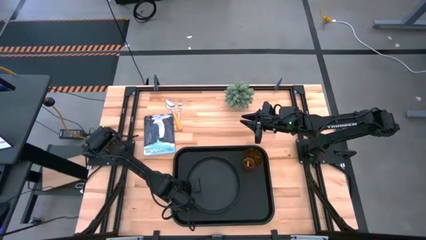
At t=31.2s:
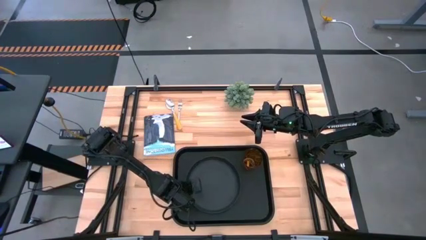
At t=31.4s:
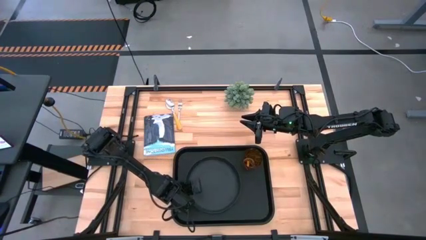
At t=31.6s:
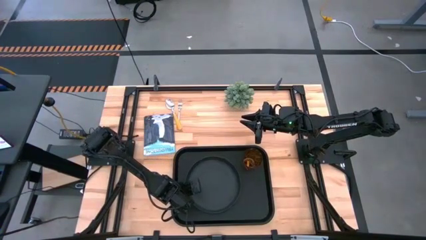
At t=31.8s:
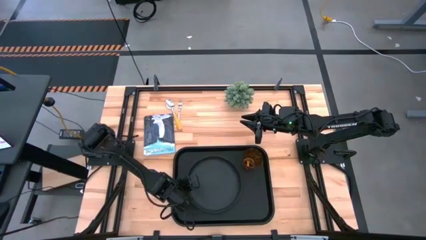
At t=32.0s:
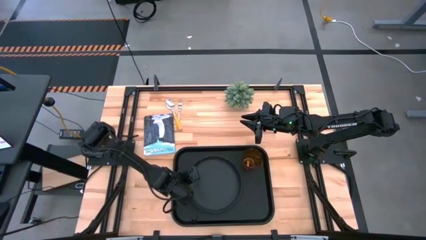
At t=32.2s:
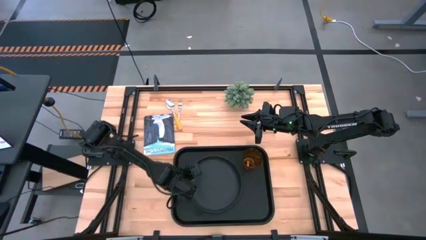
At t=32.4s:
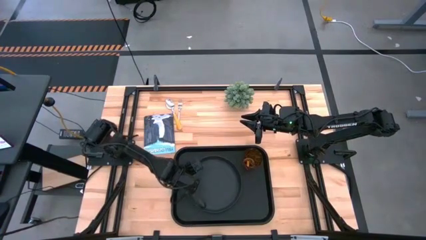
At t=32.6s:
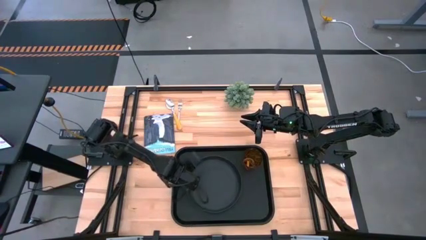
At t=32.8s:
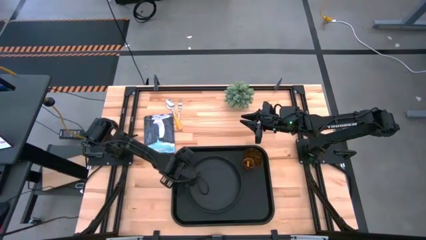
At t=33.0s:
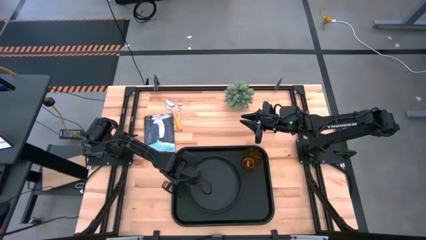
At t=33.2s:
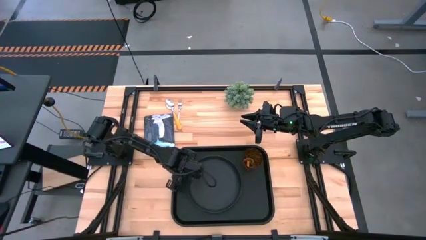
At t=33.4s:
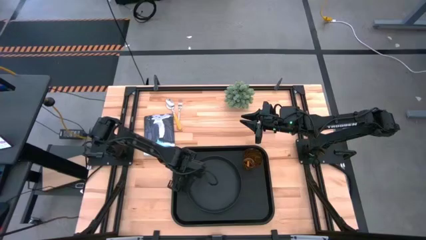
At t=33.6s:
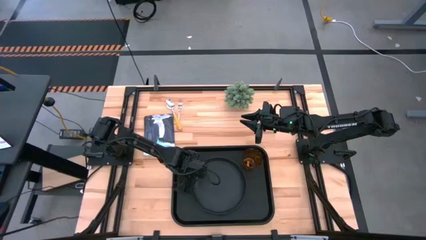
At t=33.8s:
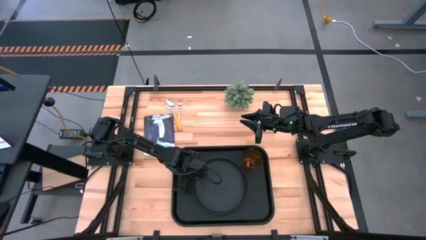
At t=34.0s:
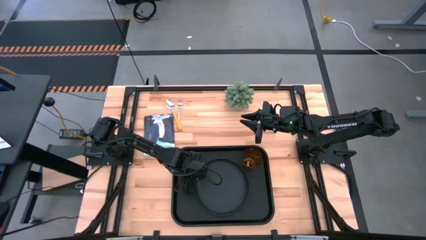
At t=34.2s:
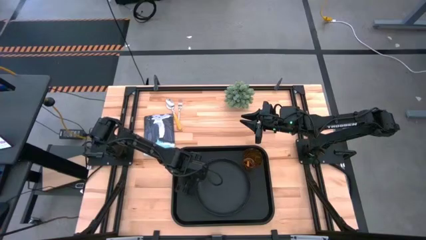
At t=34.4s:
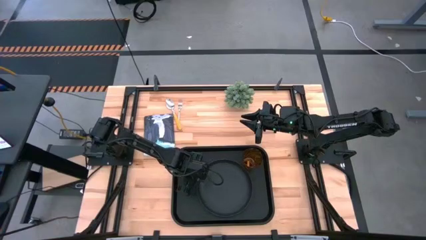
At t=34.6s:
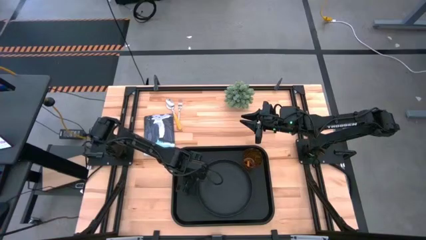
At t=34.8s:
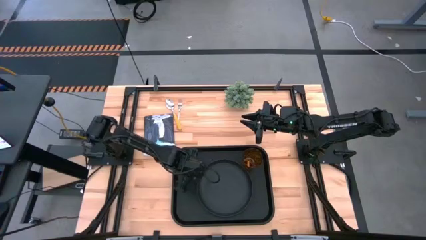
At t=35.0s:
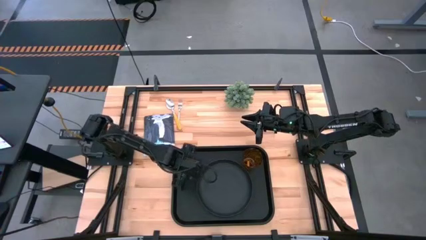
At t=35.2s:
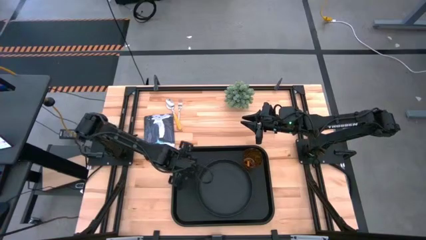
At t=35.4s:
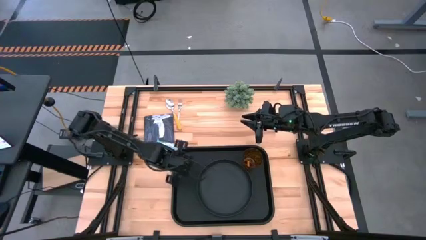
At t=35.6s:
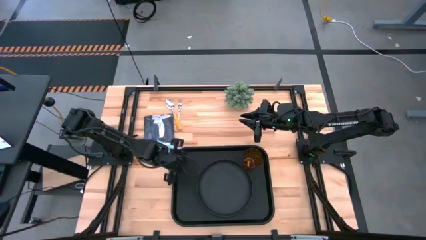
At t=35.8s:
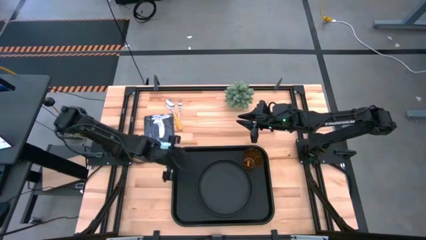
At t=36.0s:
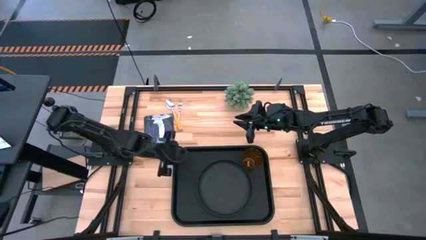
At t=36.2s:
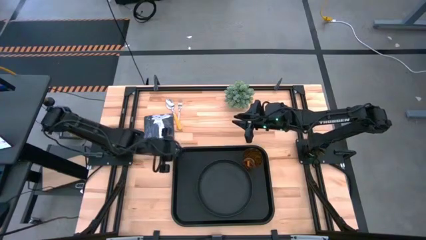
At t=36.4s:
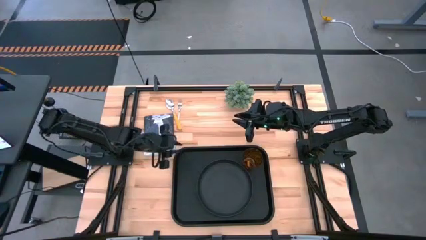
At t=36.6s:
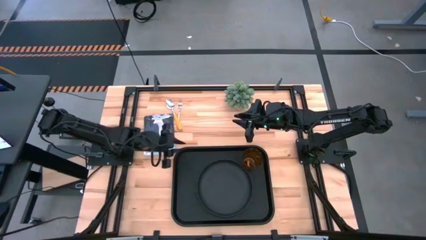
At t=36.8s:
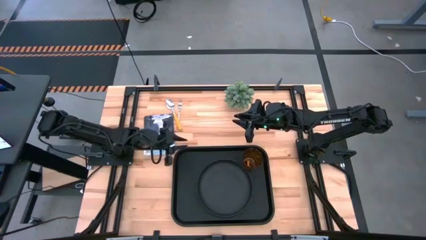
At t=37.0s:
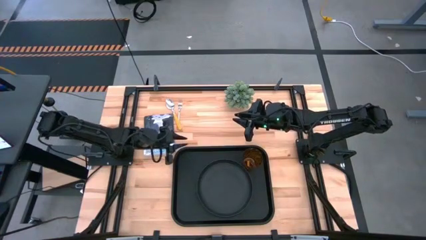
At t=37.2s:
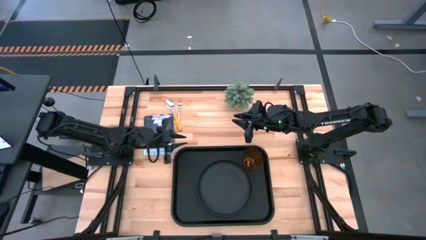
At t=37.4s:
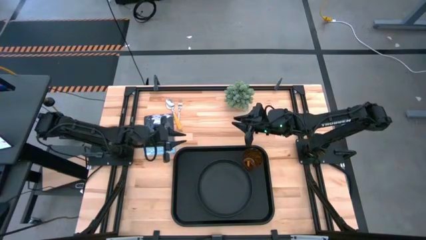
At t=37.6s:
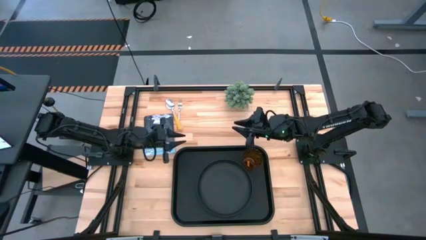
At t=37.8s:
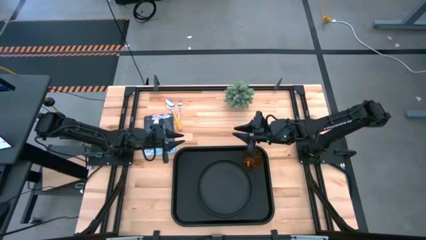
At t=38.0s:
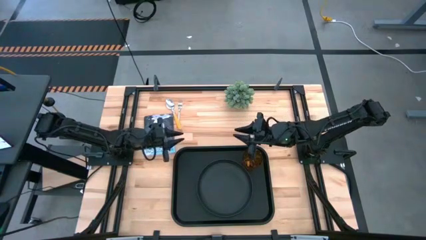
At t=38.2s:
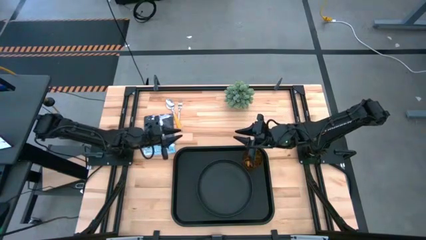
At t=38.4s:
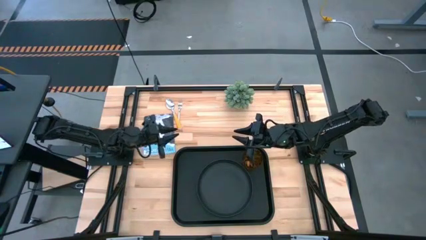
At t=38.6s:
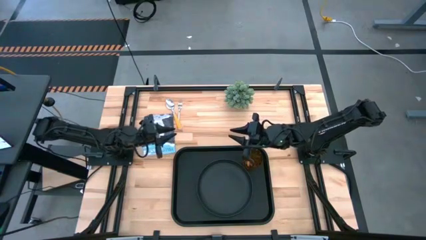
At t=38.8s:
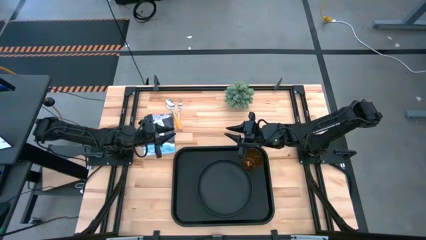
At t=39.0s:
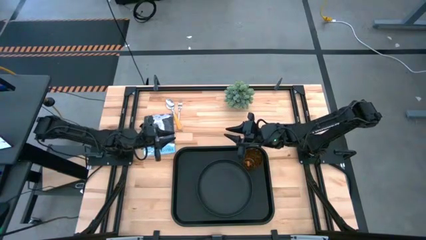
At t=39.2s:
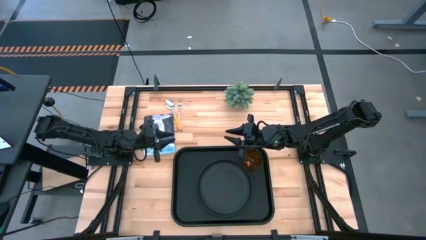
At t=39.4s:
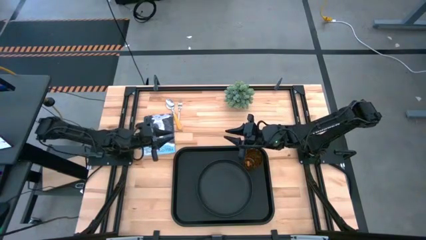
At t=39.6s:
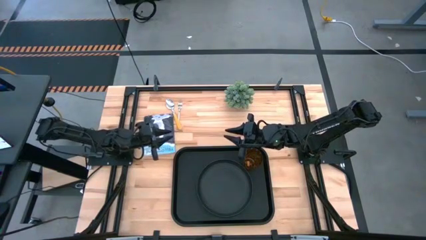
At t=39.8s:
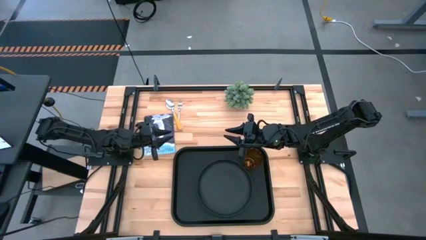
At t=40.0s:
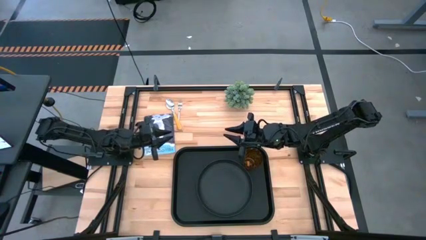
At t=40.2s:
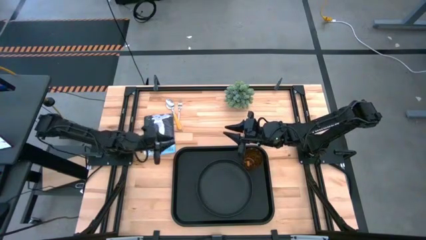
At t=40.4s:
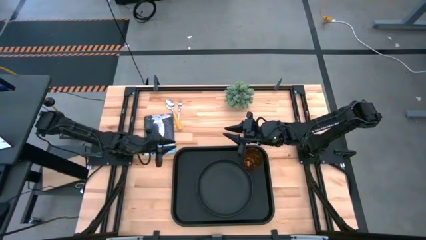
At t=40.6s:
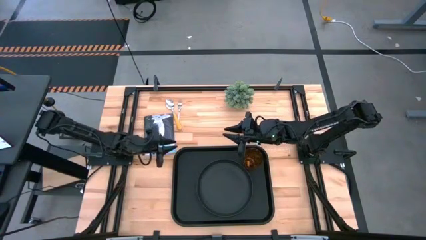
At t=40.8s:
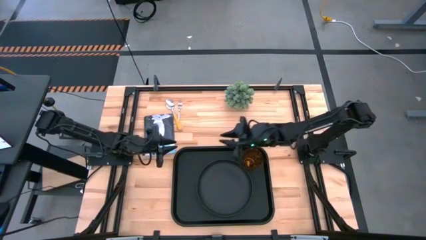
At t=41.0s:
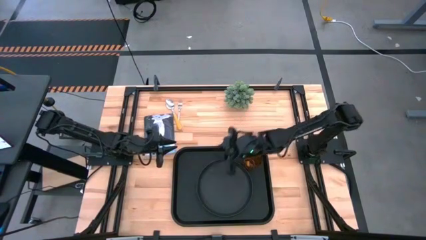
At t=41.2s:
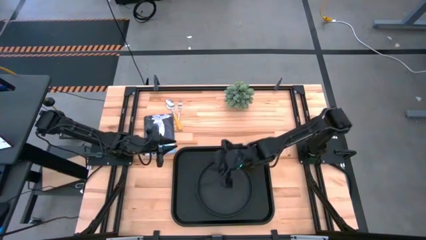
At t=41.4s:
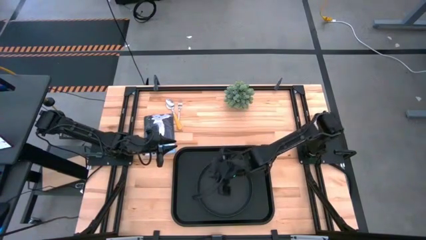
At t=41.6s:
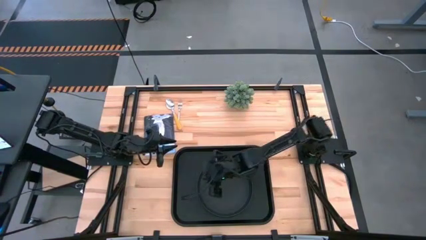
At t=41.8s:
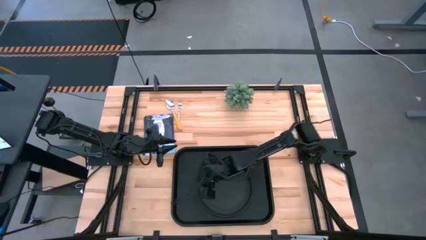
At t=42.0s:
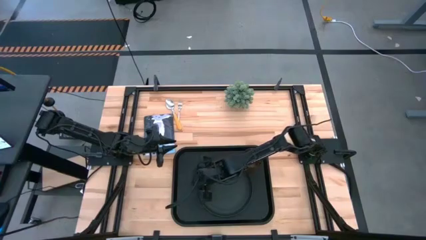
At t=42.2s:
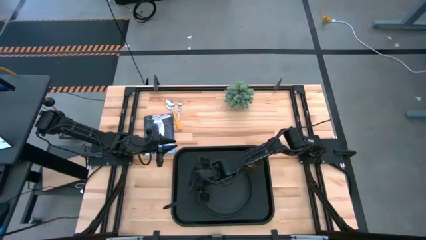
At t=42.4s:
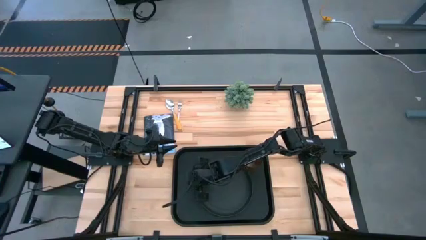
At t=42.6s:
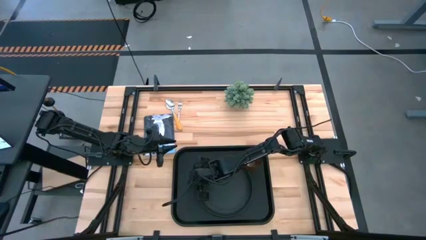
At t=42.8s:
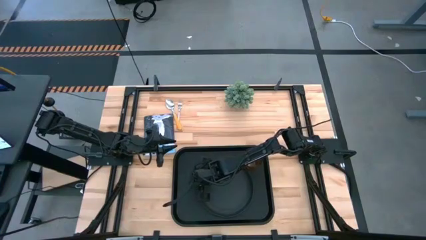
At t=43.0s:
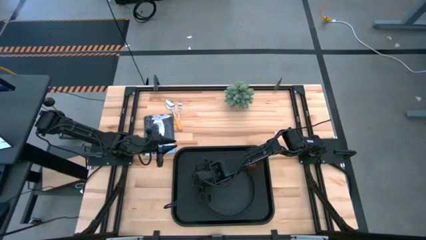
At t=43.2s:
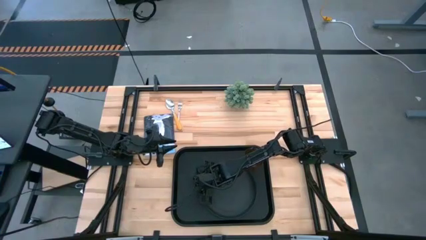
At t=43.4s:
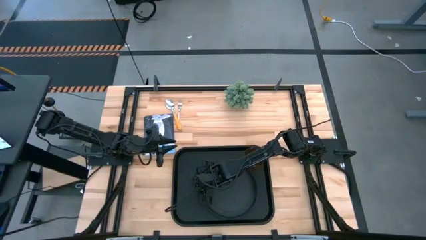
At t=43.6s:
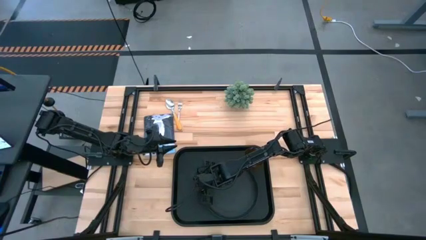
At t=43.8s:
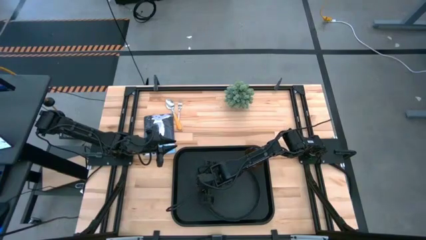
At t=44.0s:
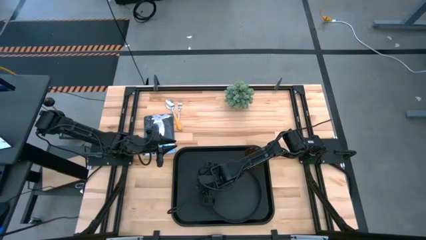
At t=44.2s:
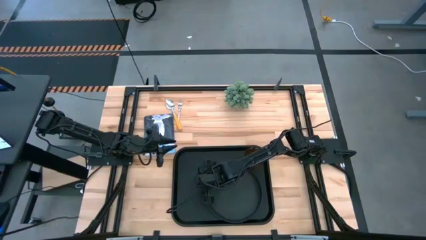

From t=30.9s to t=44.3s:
Task: Pick and place plate/cup/fork/spoon on tray
Put the black plate on the black tray to the bottom left of the orange glass
